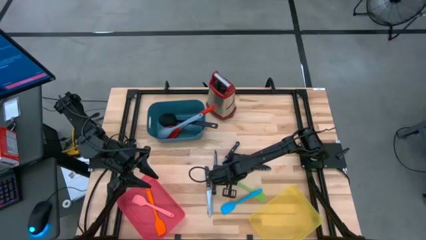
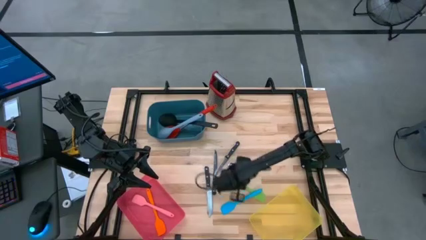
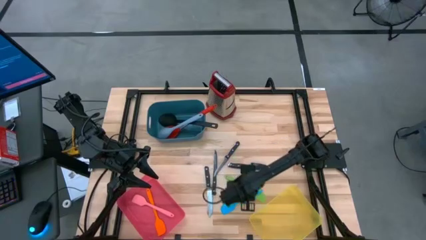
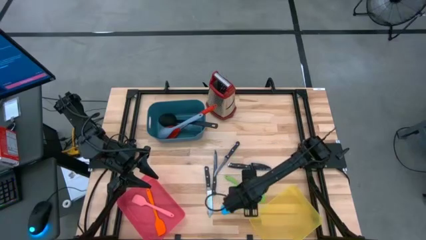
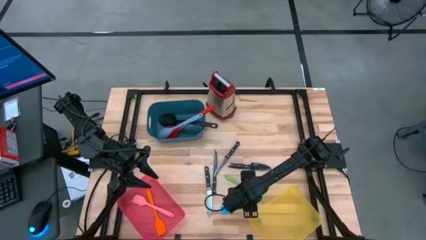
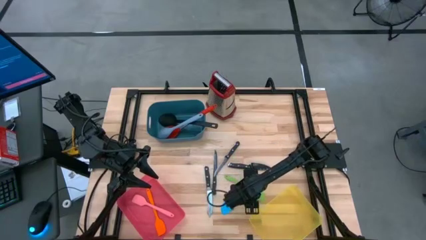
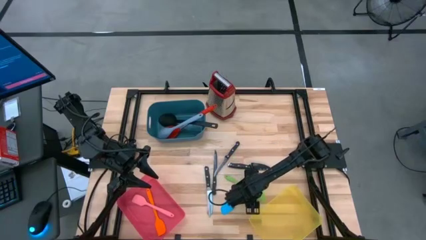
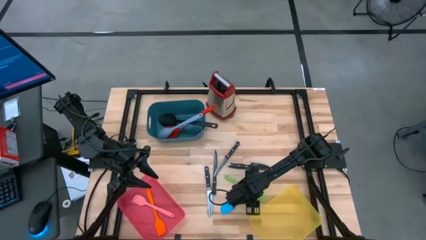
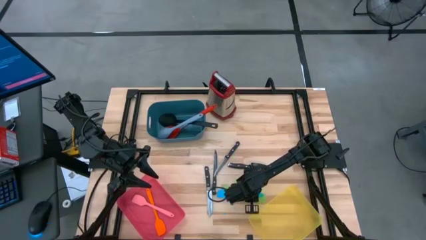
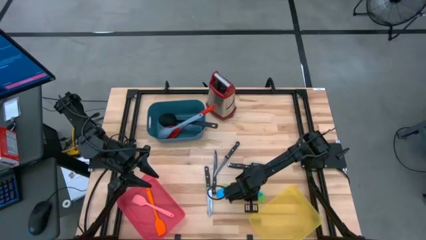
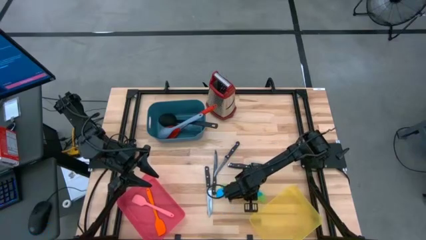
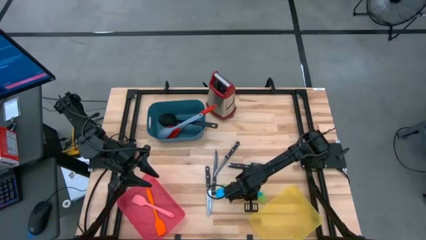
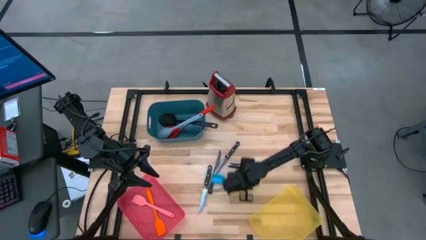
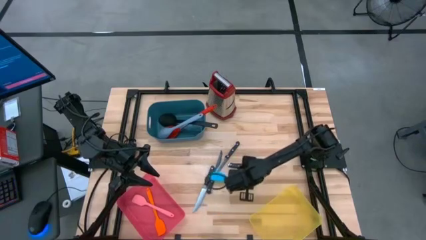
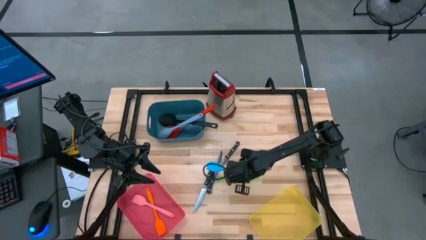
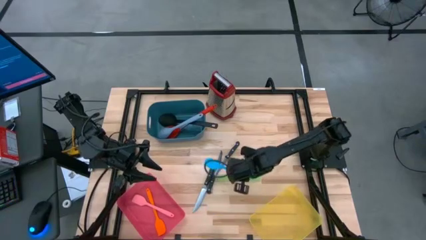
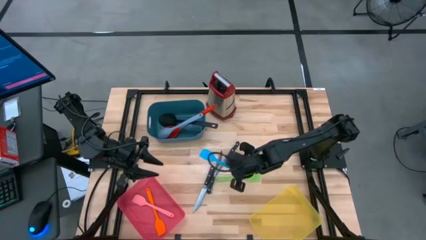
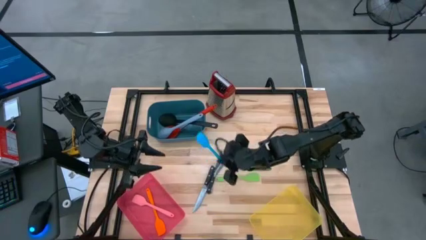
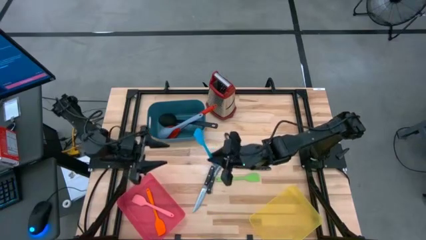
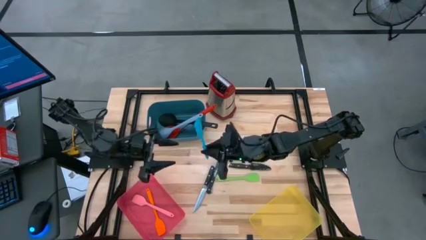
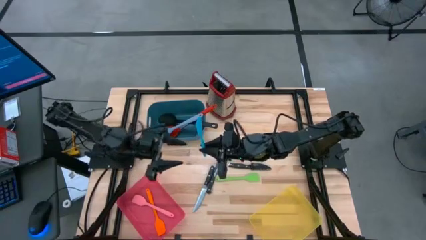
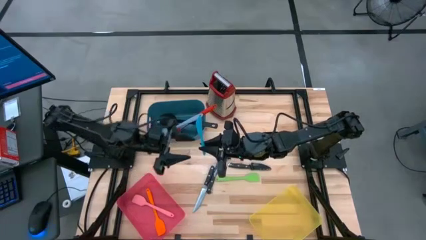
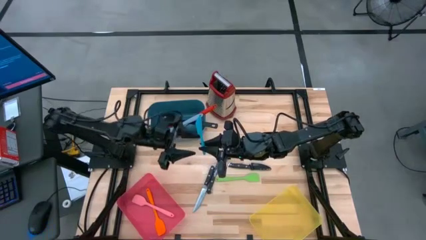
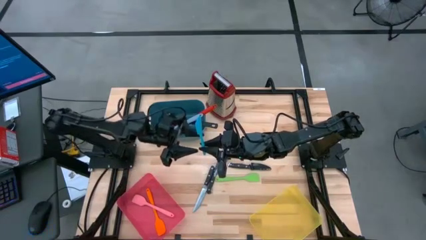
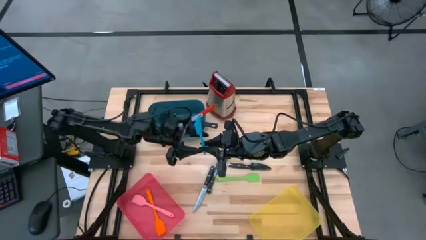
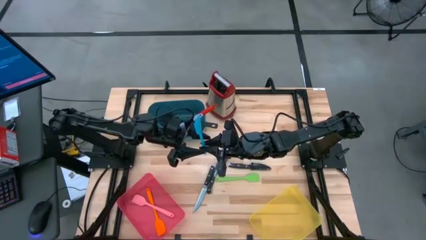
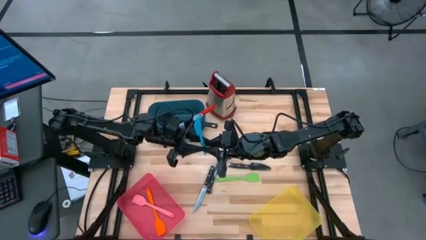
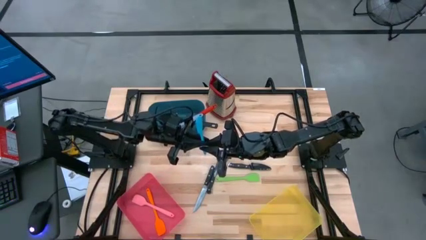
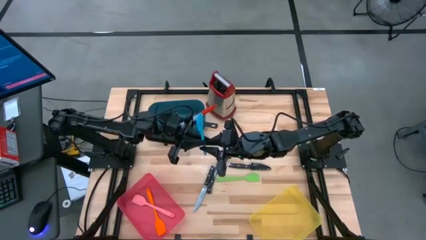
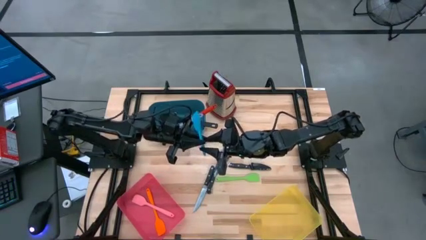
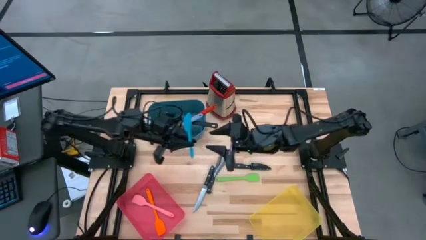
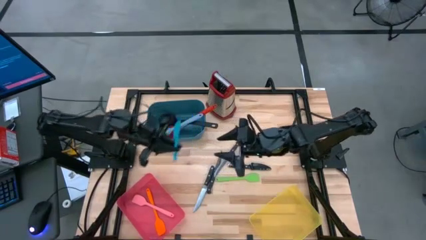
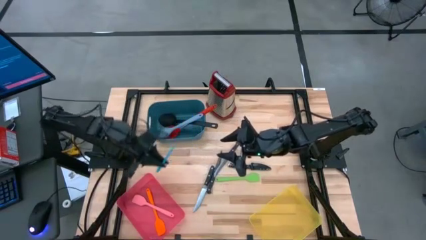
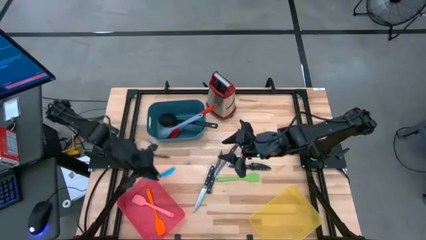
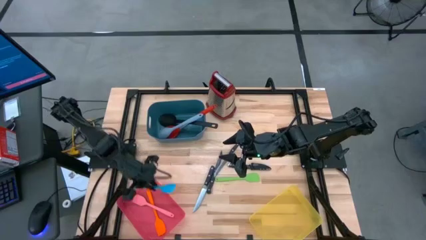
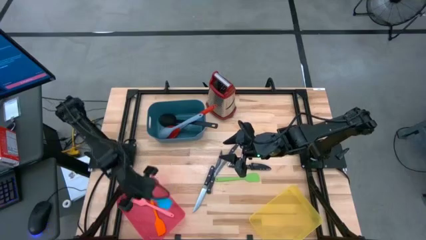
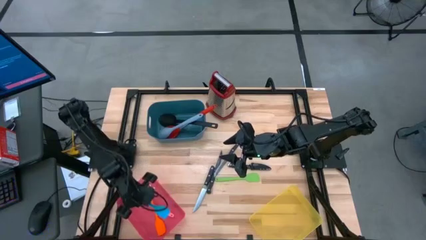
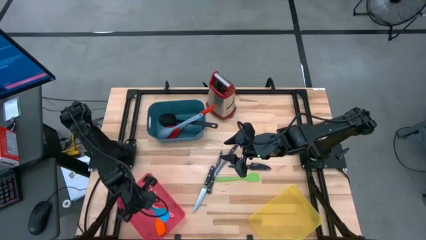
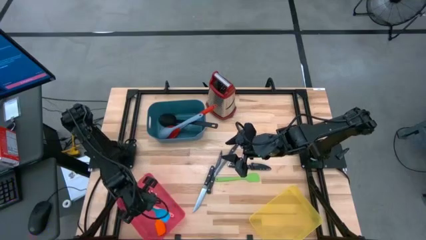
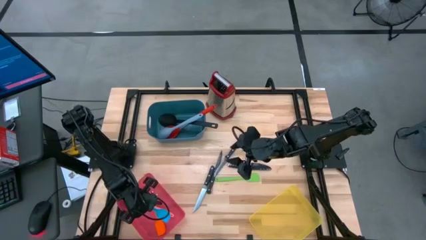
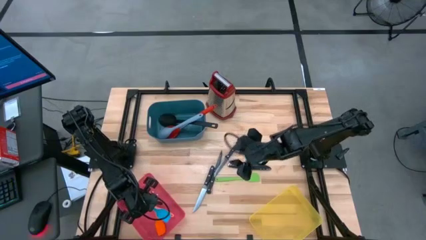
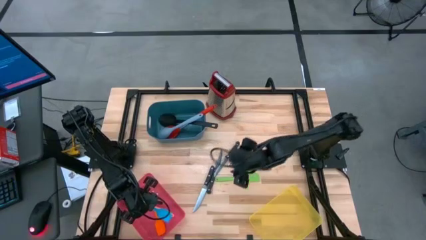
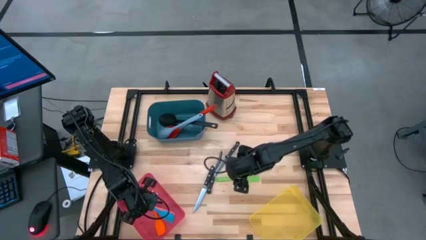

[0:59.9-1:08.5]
Task: Pick & Place Kitchen Items
Put the blue spatula into the pink bin

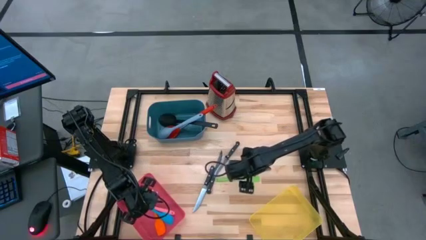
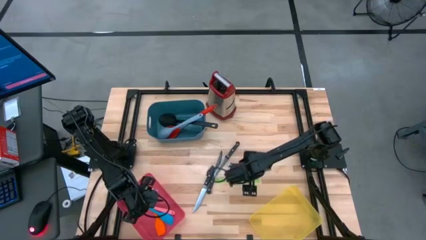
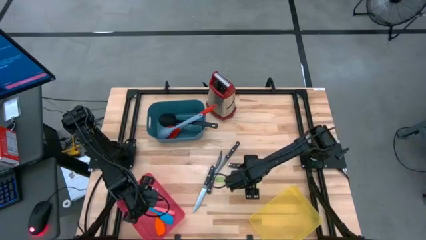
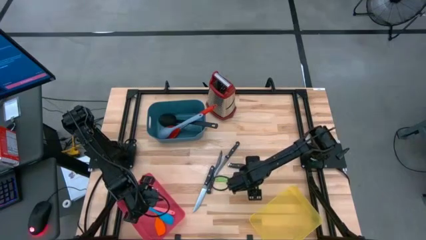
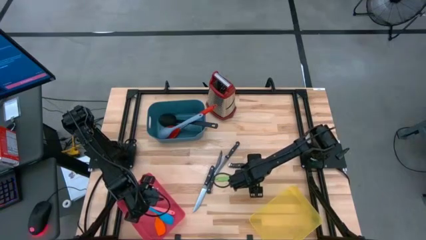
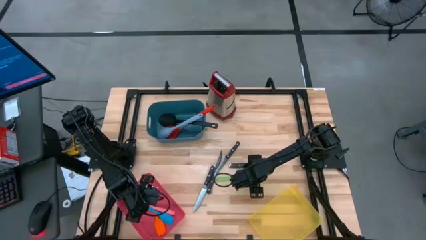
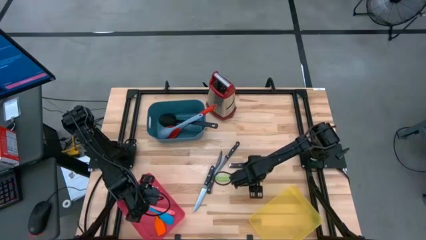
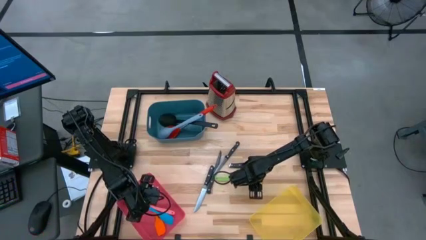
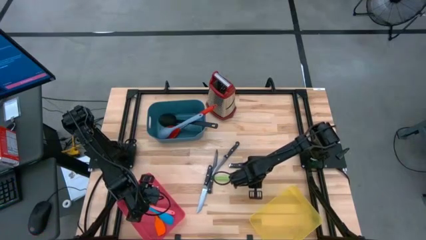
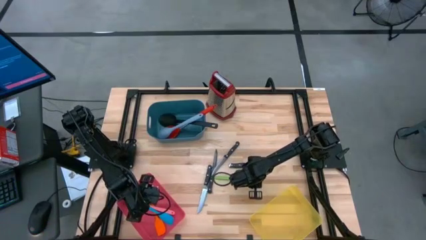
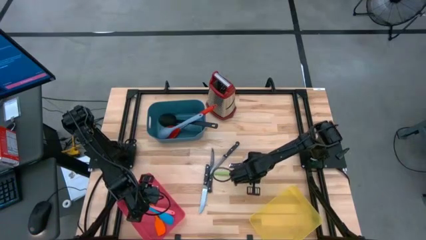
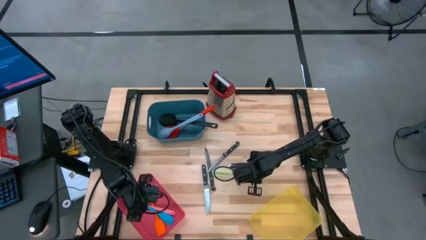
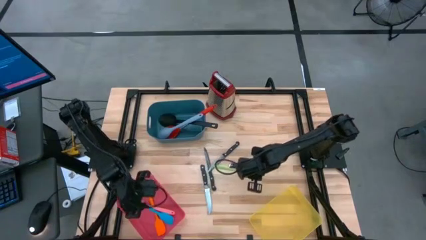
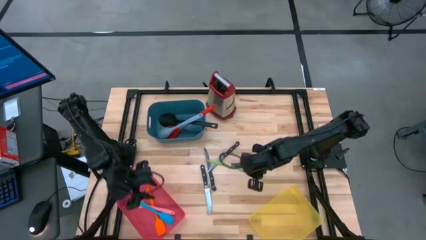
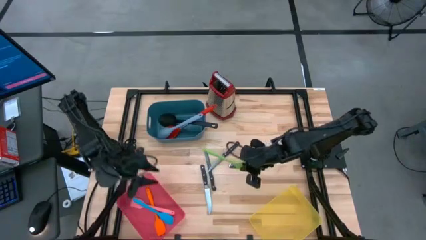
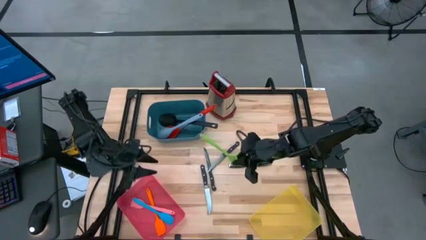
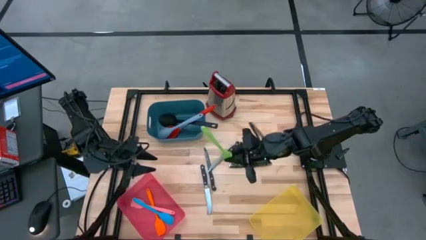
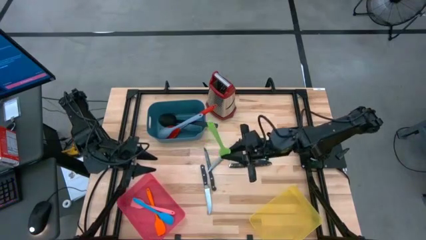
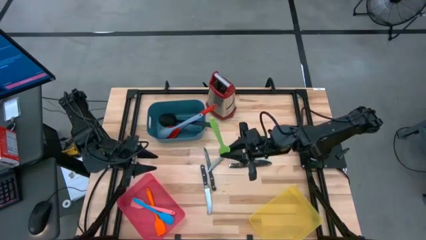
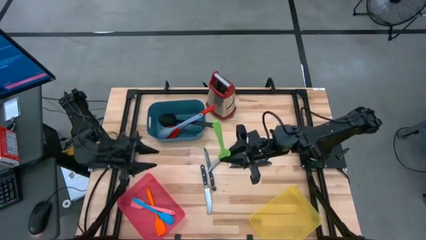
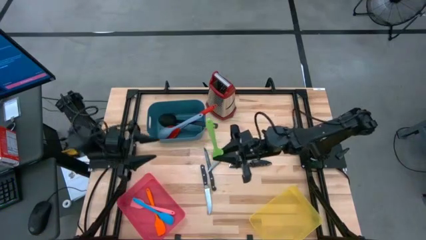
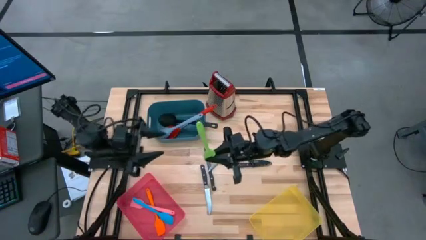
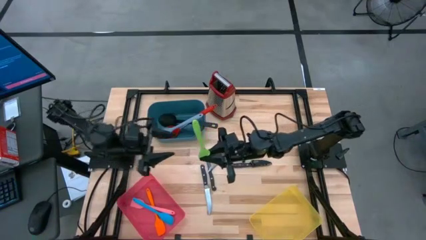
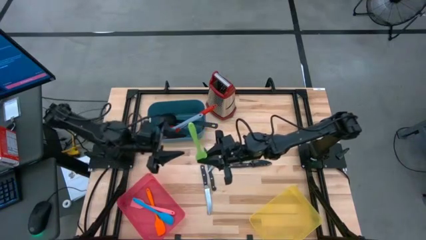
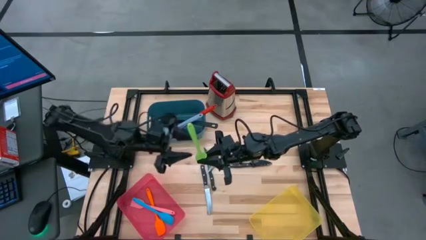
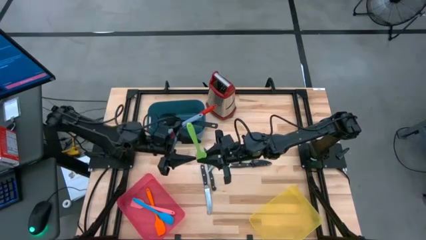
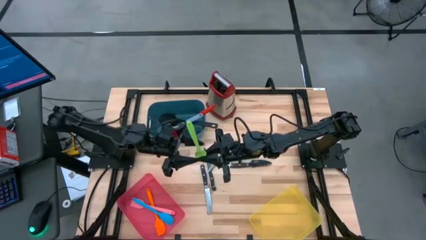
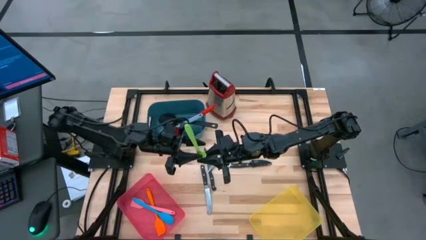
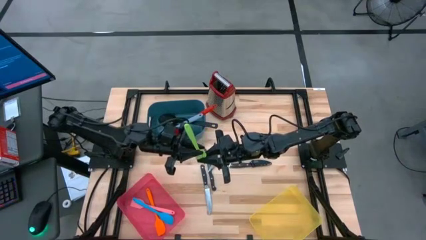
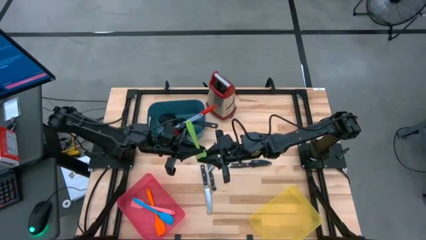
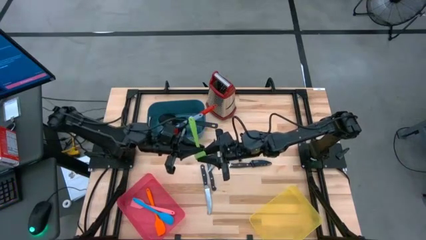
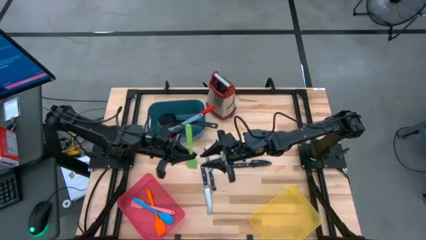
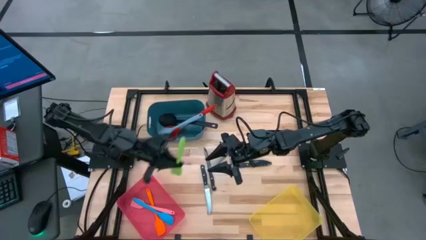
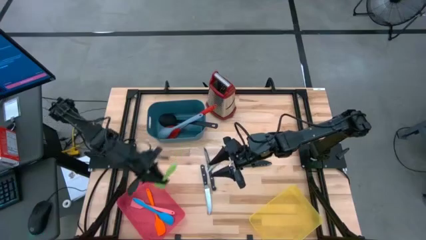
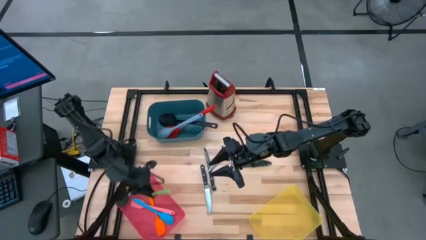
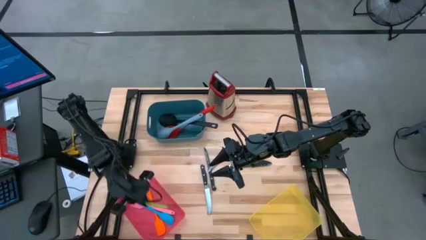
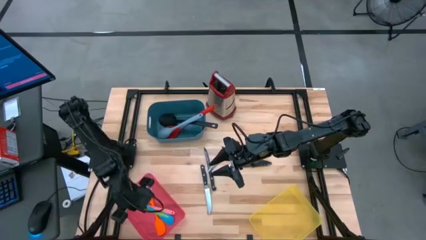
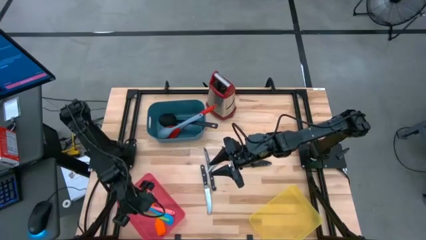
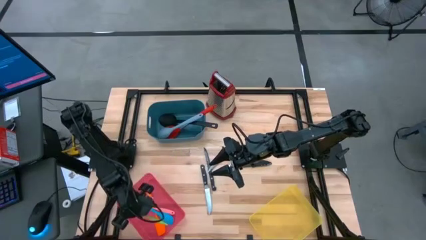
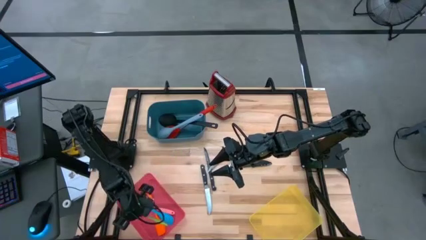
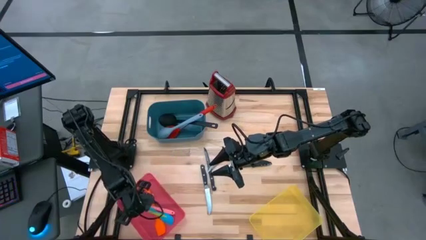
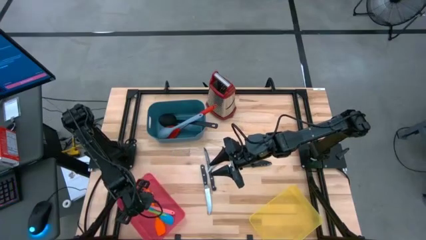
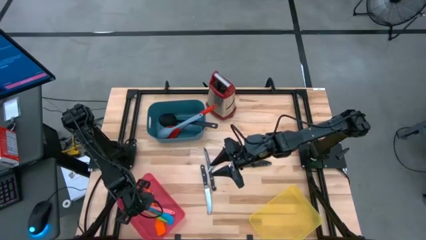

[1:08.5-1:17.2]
Put the green spatula into the pink bin
